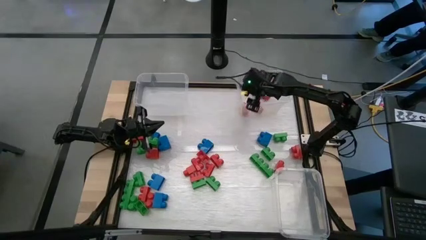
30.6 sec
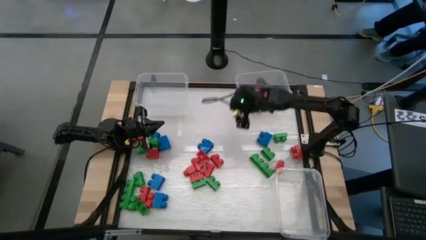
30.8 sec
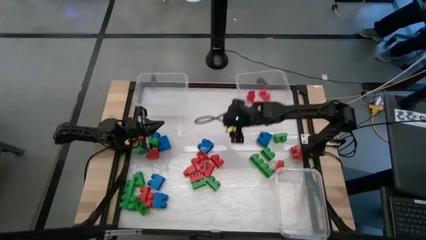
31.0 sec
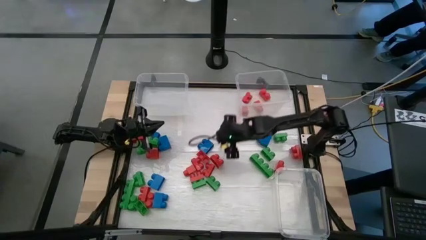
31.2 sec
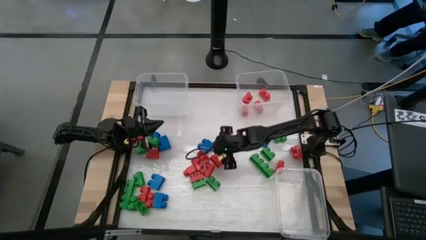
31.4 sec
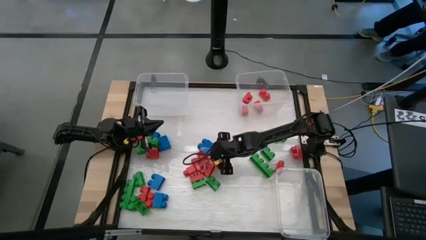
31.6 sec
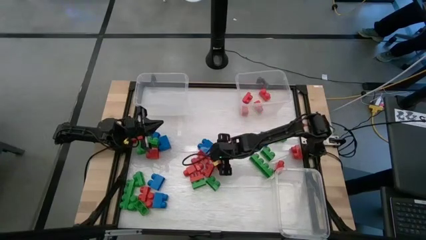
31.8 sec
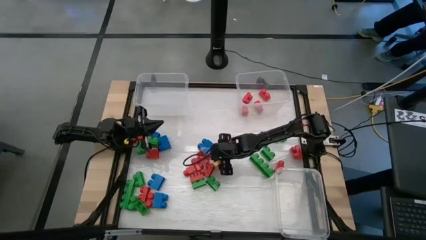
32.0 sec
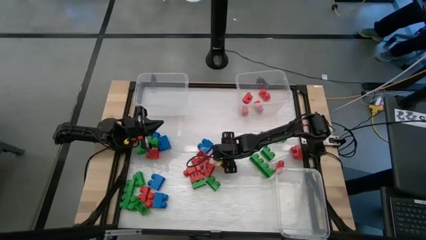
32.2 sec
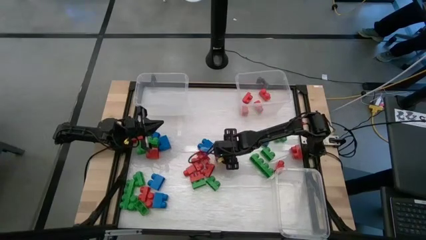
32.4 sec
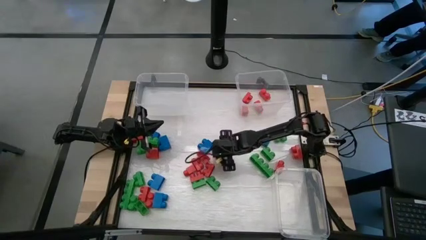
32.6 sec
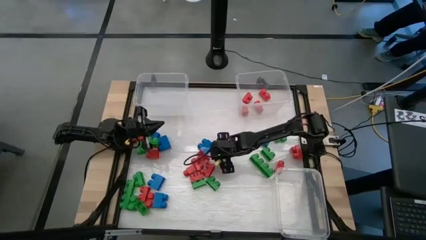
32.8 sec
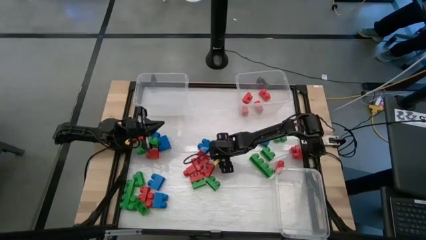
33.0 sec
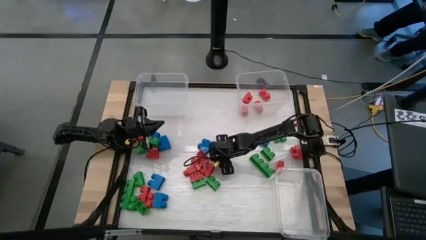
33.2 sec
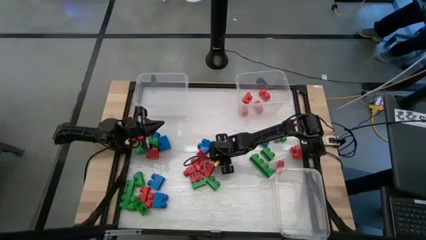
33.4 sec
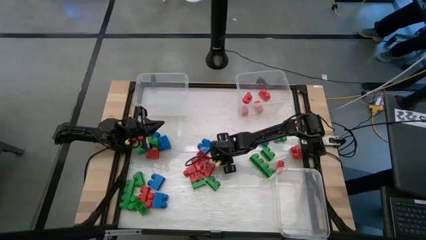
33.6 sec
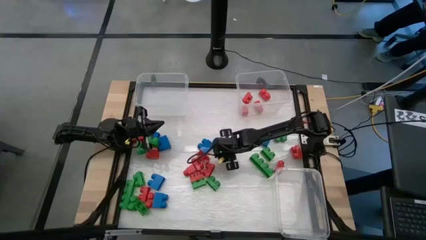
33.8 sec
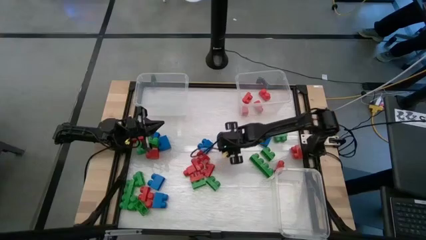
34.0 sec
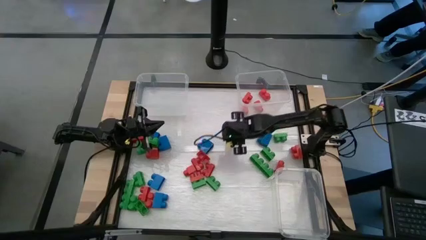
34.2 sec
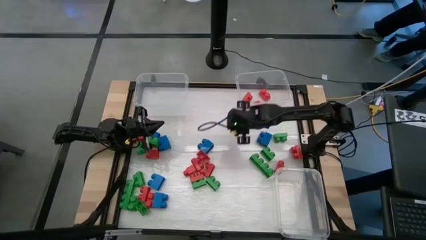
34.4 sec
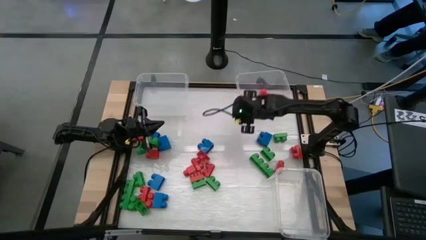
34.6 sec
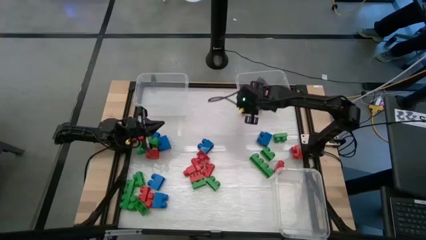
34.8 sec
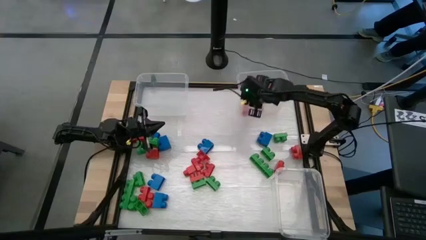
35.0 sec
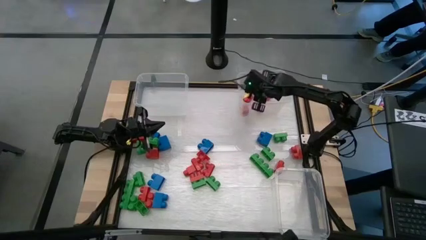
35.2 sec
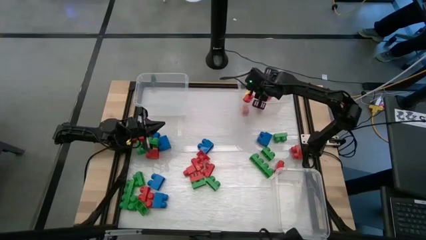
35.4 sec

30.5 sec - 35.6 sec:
Task: Sort blocks
Put the red game piece into the top right transparent bin

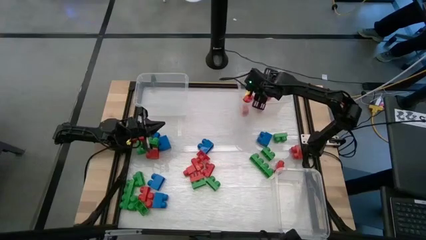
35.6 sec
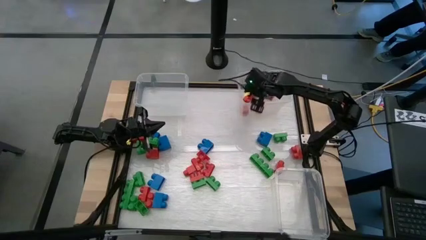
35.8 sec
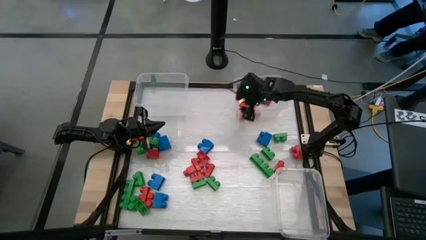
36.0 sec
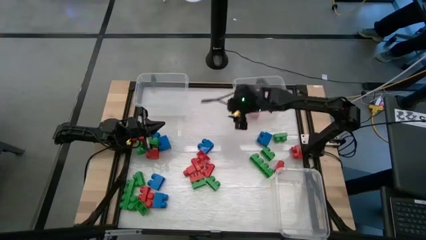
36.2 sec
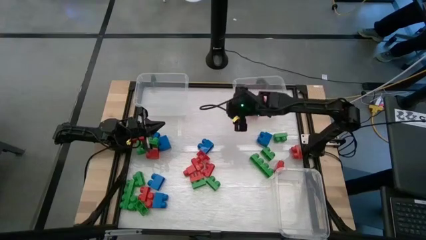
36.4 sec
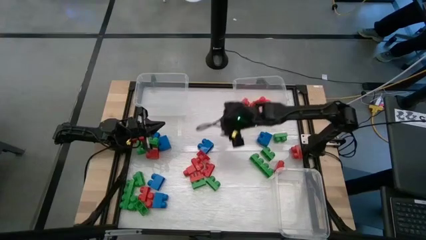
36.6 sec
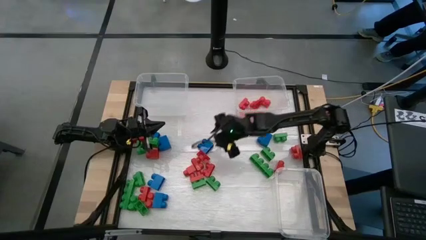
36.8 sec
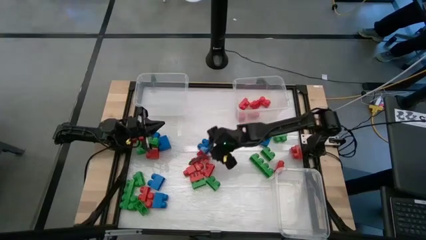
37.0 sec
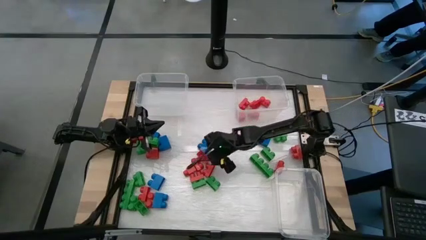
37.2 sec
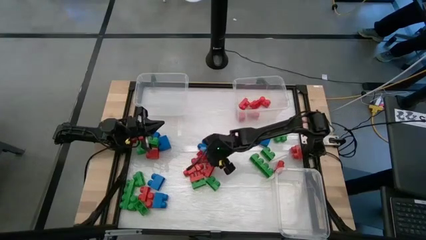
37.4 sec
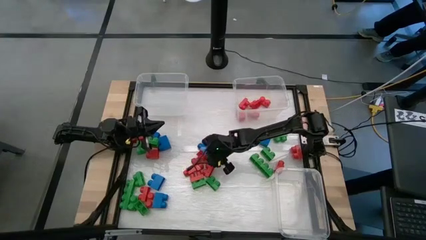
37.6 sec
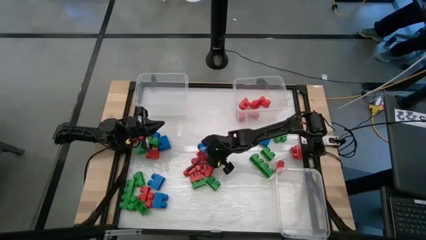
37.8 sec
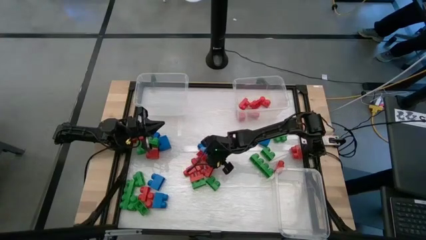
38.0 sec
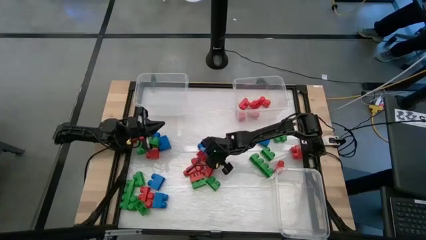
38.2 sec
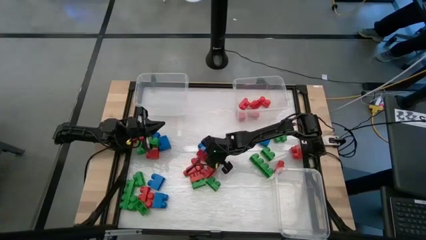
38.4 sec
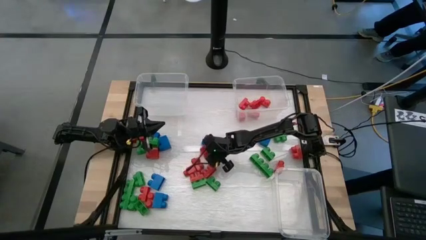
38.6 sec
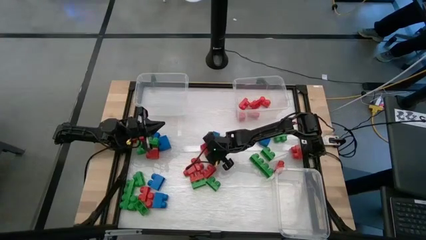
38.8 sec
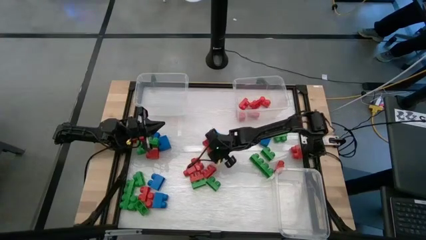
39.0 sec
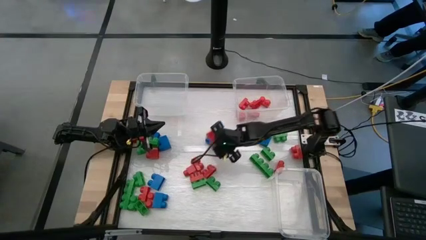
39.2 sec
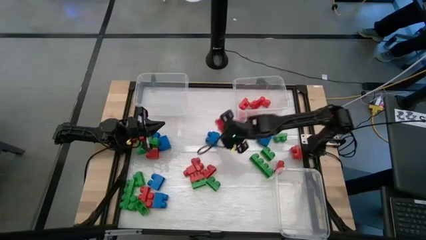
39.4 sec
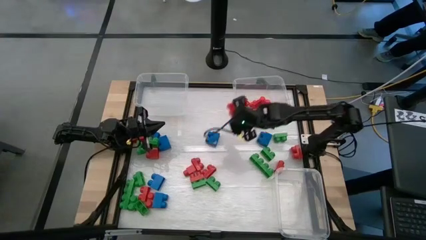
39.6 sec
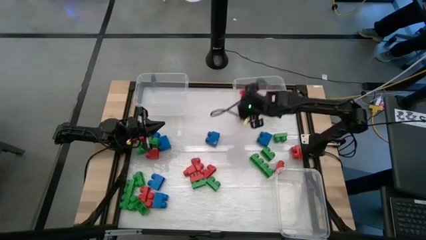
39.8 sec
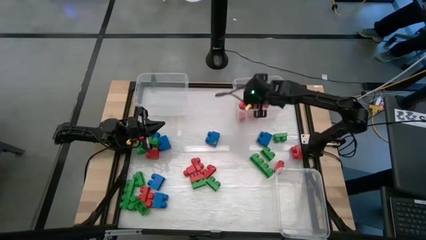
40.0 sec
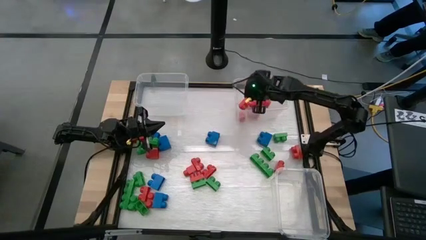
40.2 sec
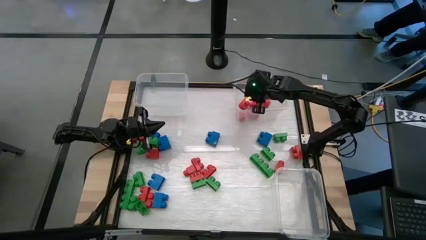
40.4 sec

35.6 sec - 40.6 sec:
Put the red game piece into the top right transparent bin

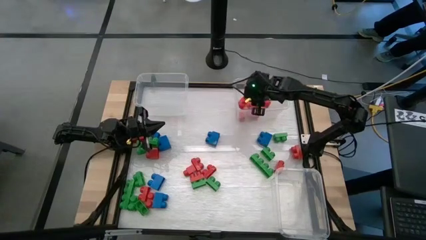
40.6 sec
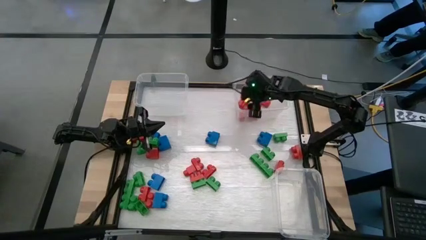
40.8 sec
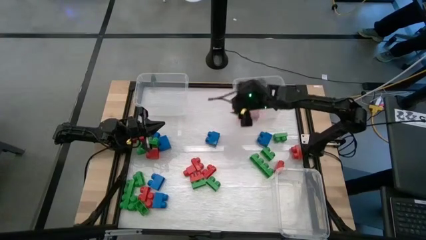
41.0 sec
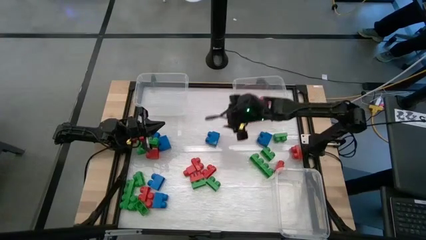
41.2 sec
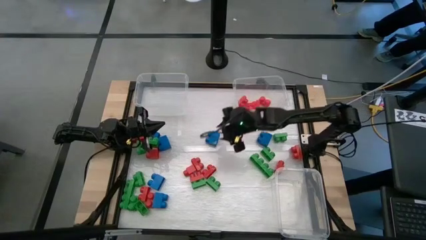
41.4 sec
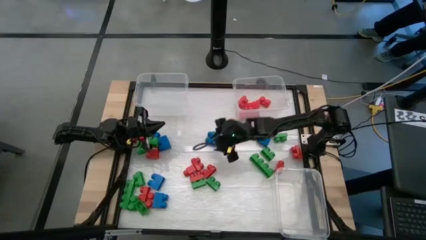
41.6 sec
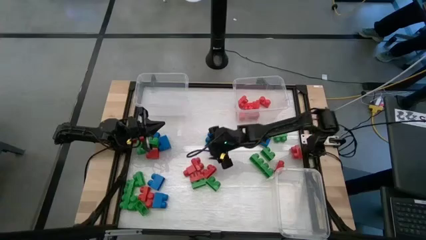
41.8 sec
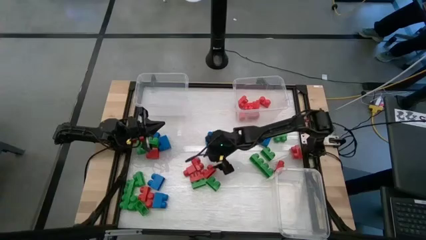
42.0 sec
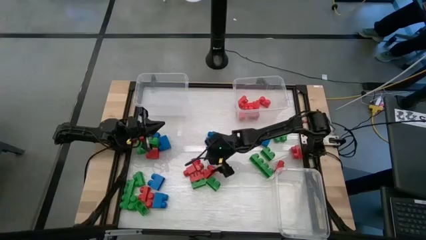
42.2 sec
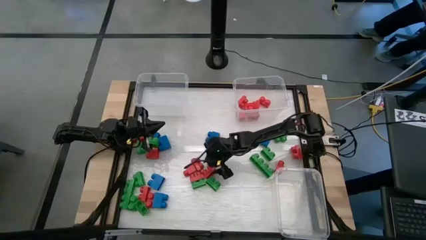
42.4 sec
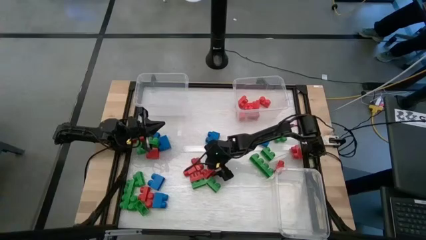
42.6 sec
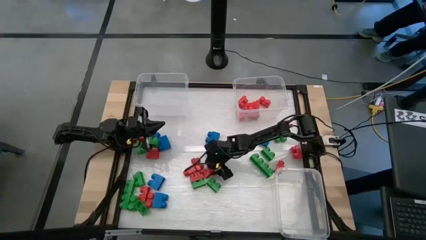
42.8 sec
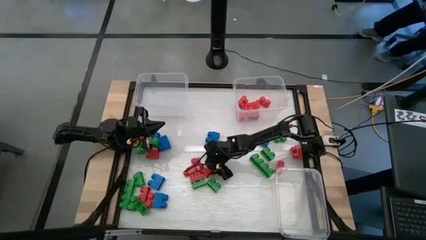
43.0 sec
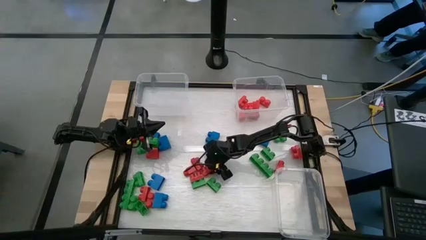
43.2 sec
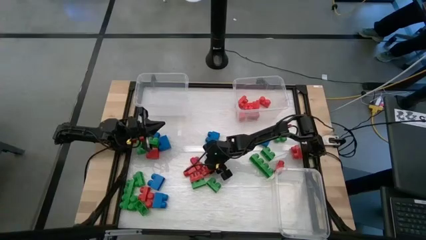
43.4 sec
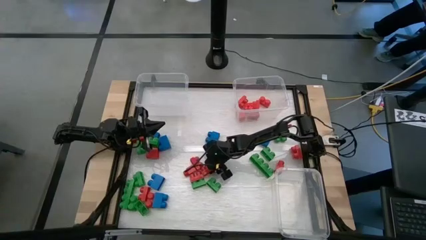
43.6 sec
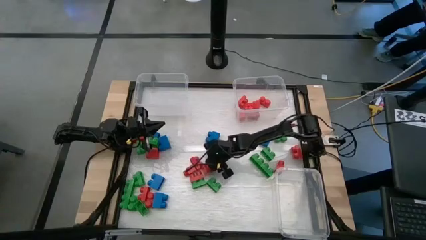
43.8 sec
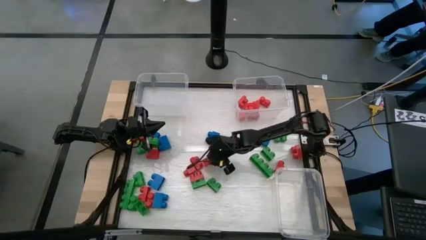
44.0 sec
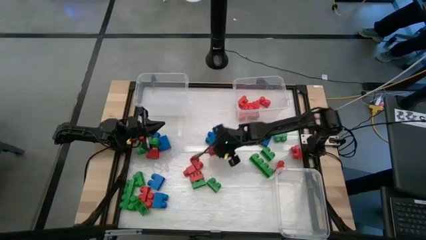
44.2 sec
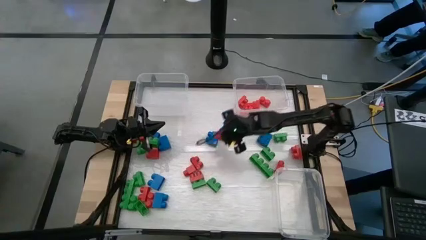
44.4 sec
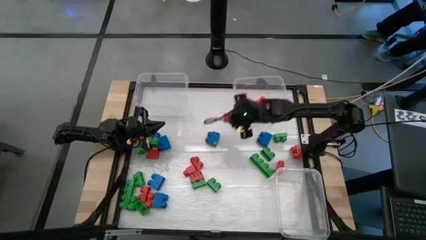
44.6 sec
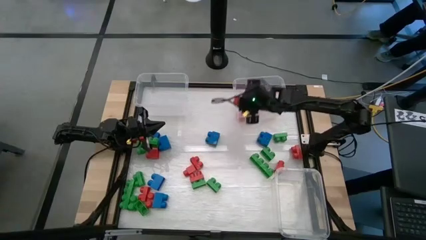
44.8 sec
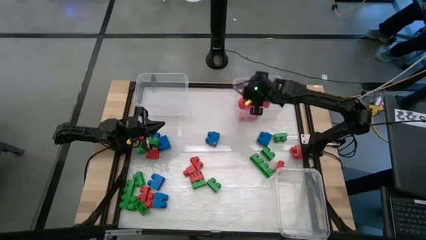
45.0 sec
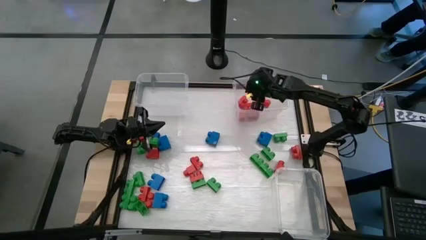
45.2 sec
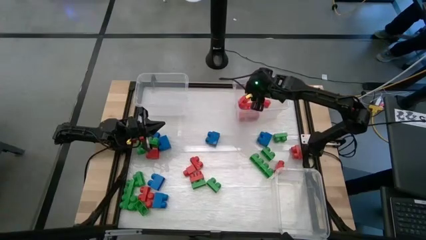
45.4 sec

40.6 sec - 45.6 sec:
Put the red game piece into the top right transparent bin

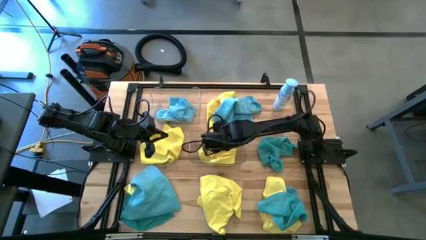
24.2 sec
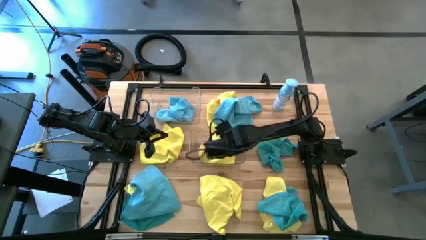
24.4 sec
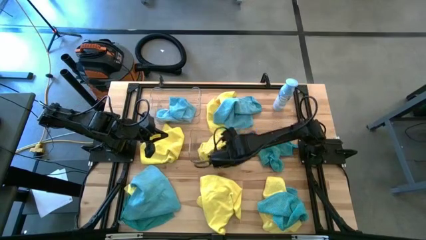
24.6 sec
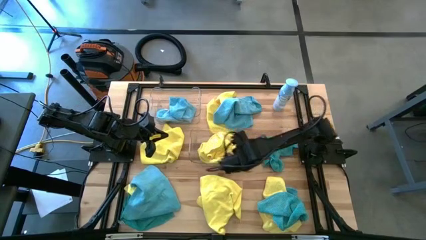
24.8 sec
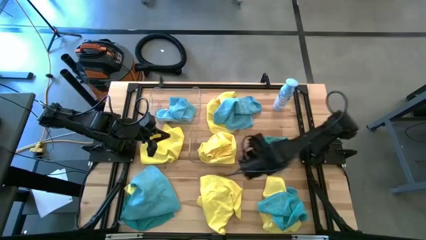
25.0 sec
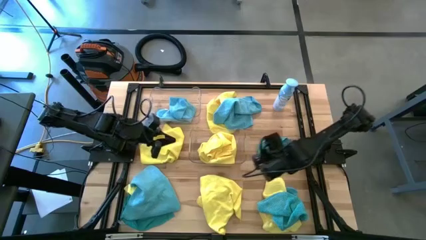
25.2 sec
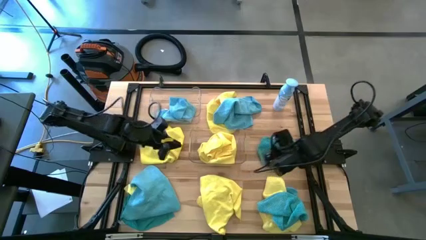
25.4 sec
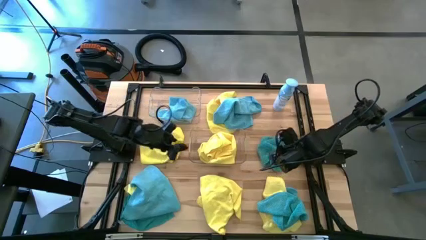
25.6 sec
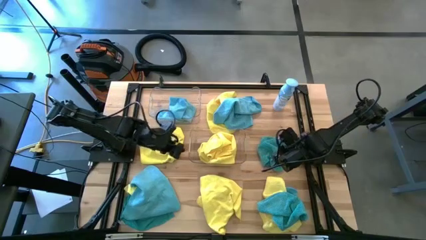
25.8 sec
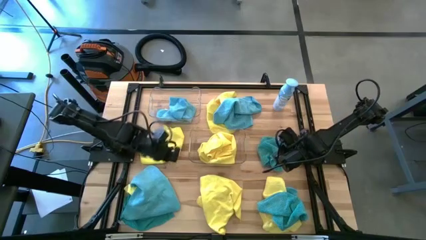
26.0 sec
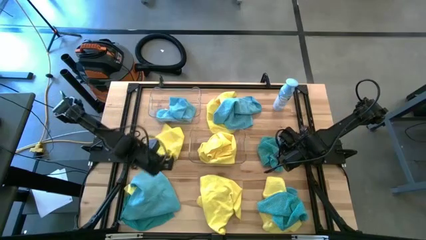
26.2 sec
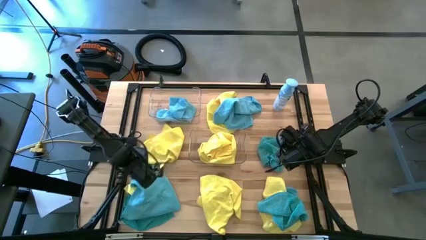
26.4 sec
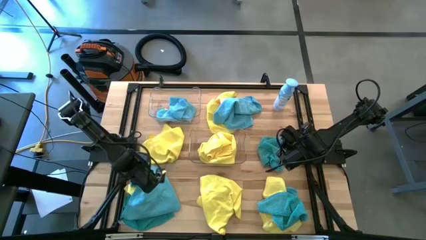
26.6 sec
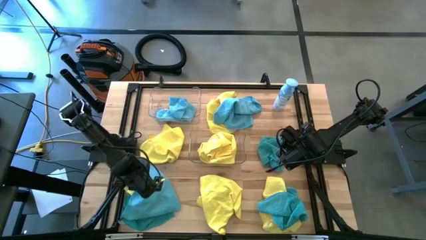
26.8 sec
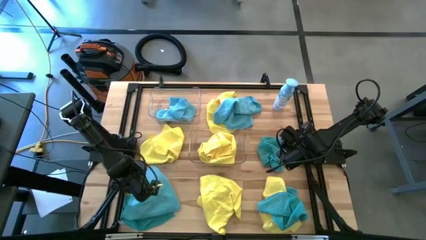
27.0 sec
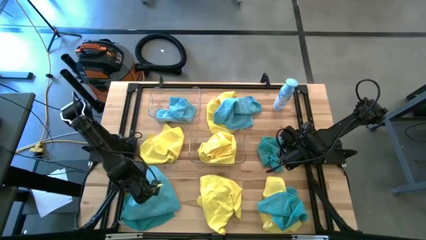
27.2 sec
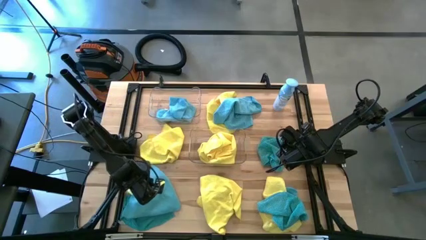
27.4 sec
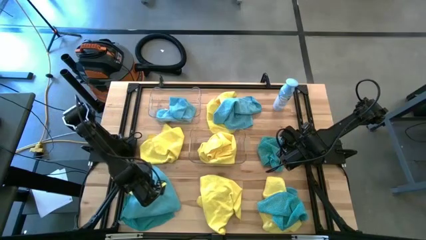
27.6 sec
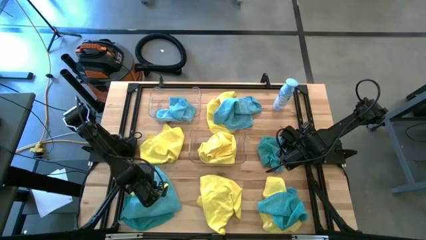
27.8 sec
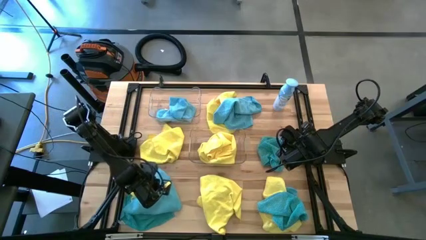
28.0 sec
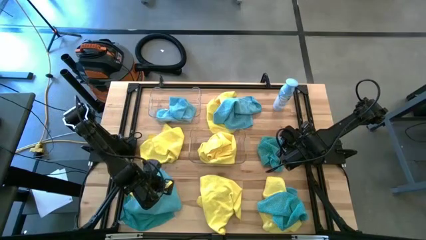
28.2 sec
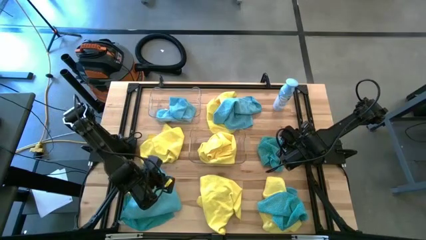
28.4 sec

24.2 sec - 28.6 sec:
Task: Sort microfiber towel by color & place in baskets
Put the blue towel into the top transparent bin
